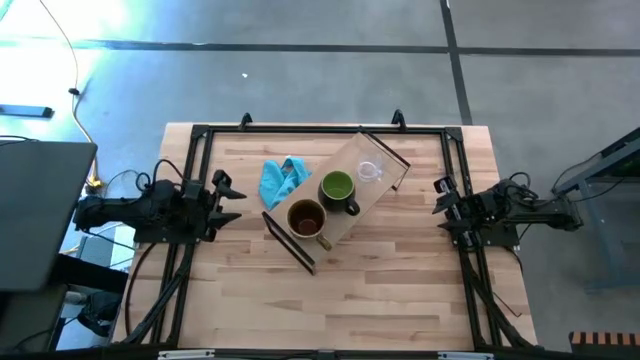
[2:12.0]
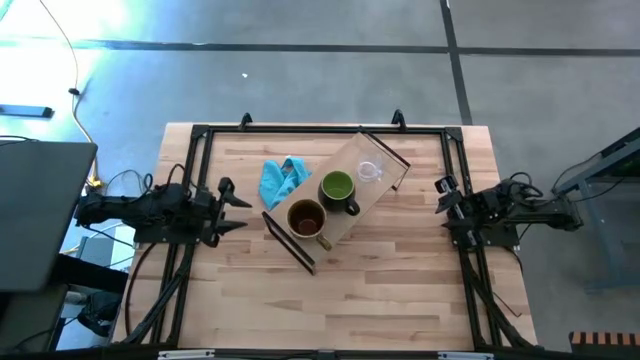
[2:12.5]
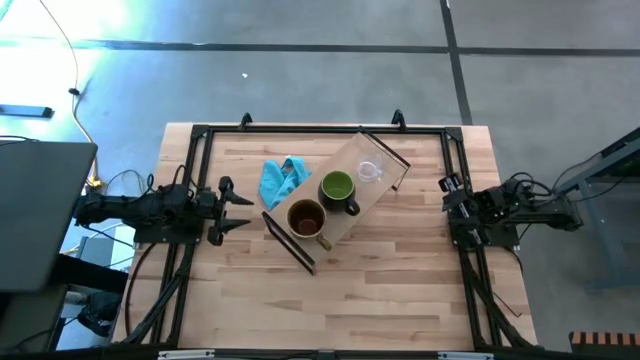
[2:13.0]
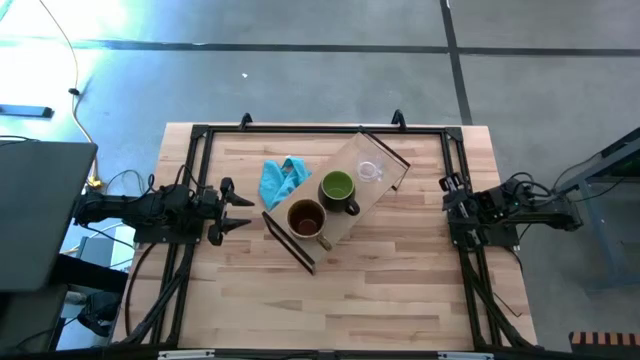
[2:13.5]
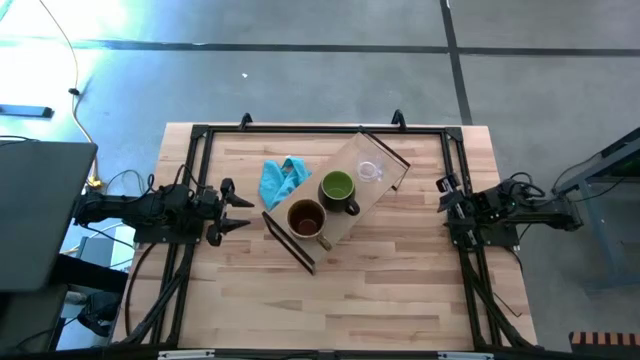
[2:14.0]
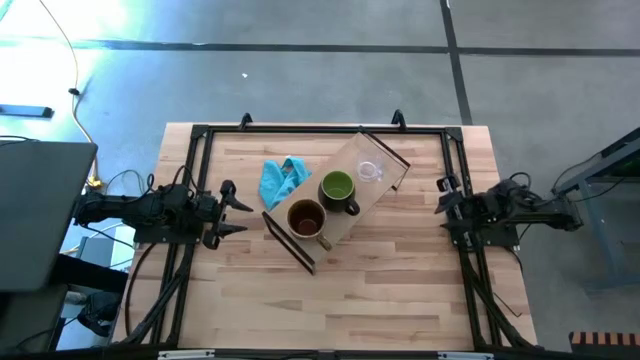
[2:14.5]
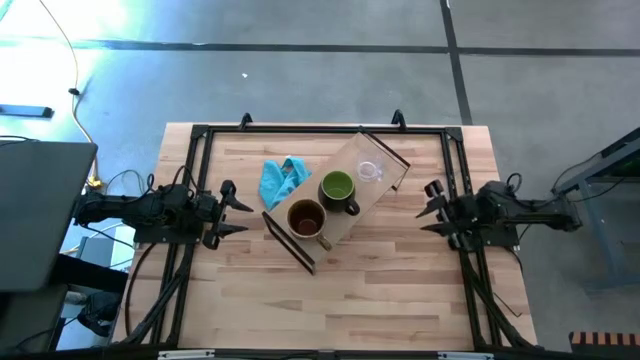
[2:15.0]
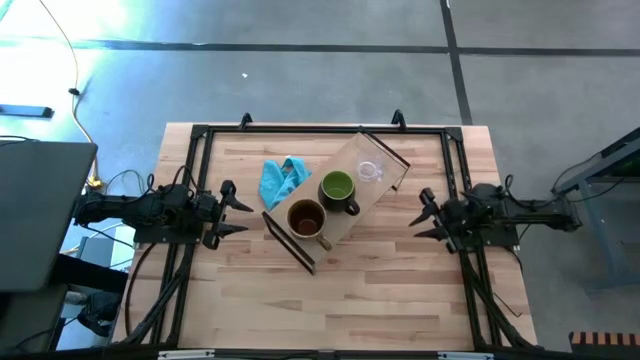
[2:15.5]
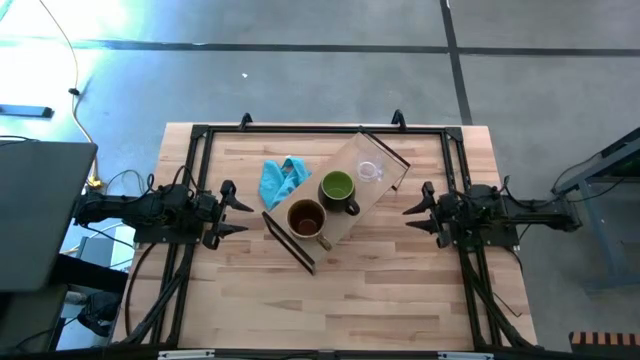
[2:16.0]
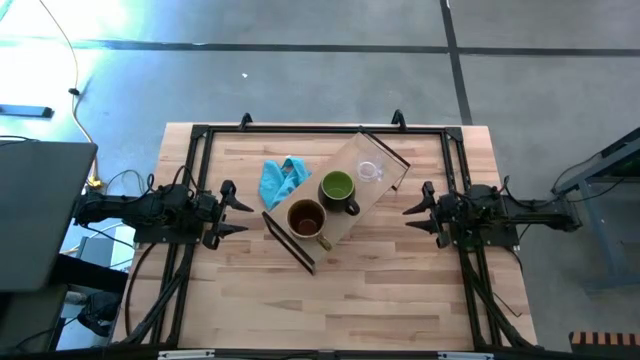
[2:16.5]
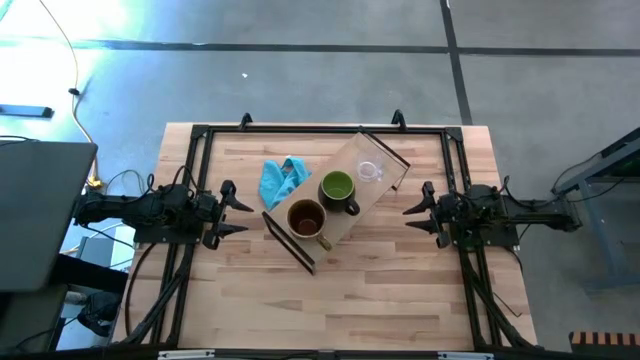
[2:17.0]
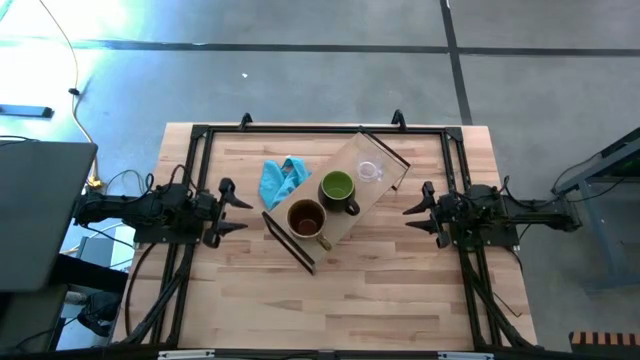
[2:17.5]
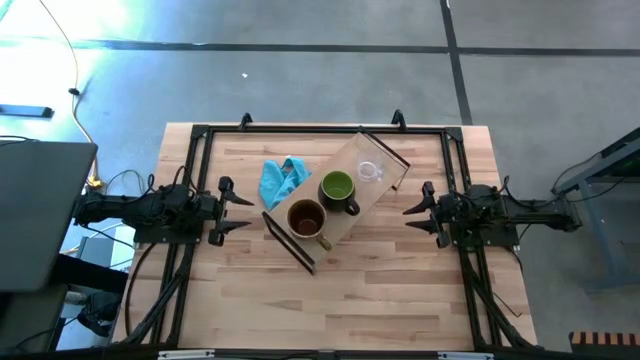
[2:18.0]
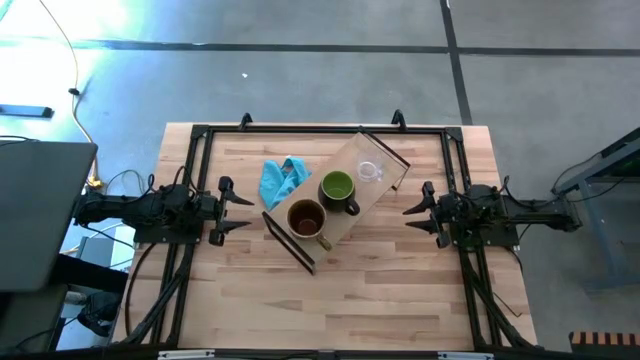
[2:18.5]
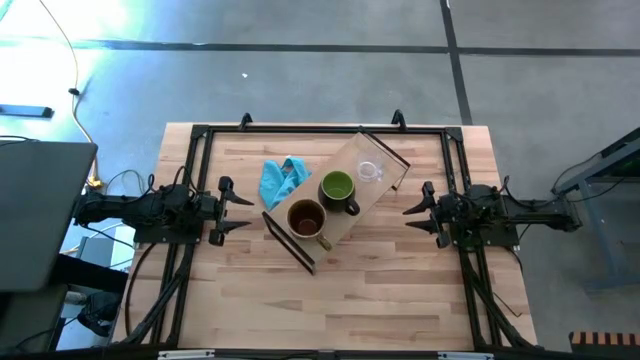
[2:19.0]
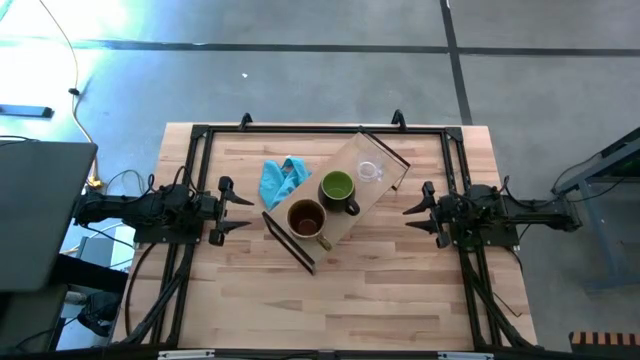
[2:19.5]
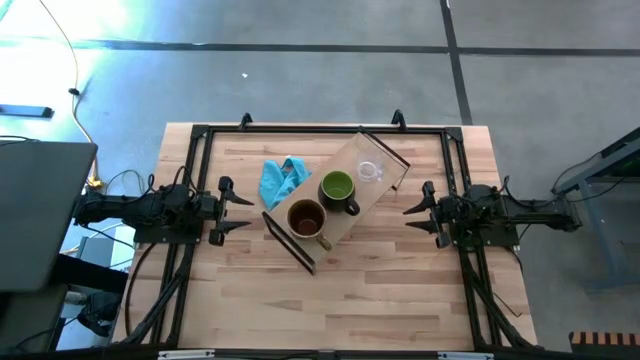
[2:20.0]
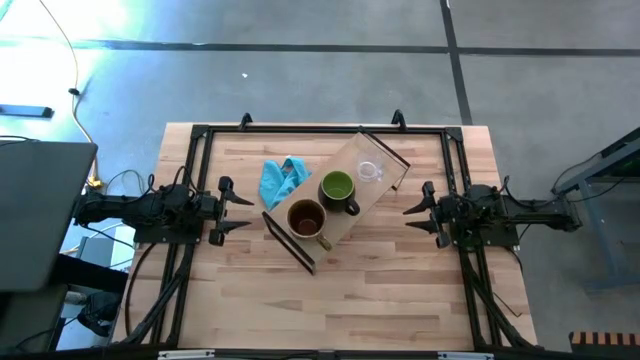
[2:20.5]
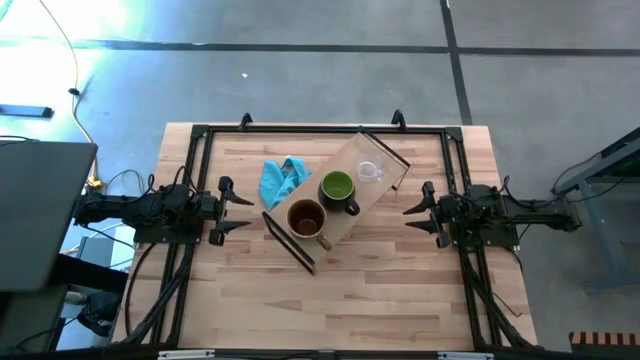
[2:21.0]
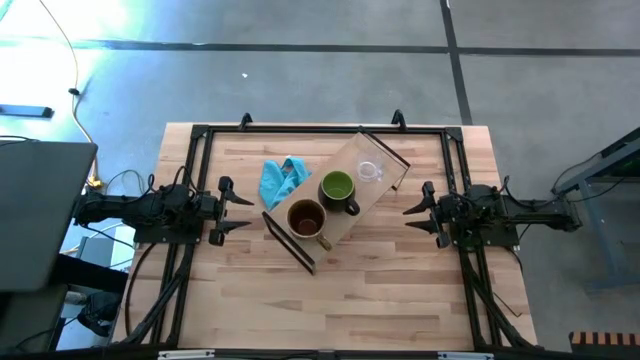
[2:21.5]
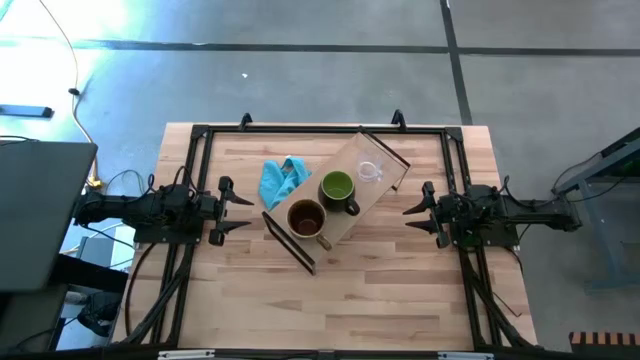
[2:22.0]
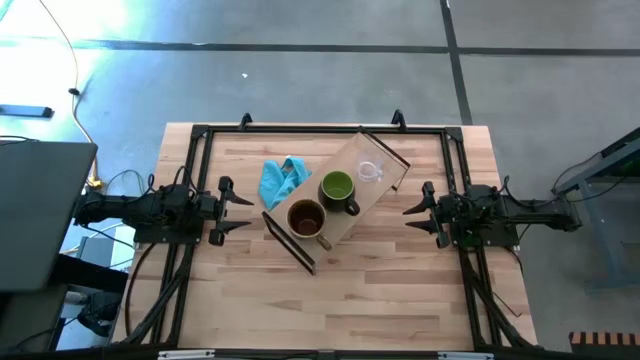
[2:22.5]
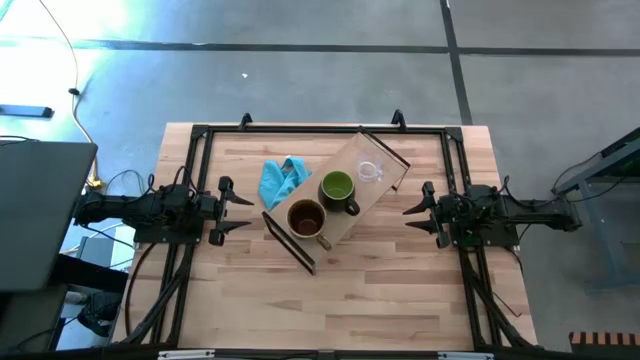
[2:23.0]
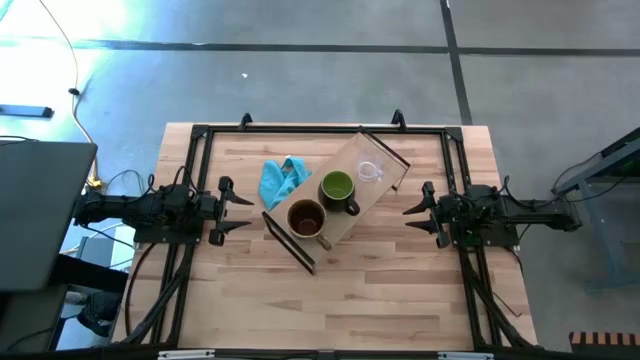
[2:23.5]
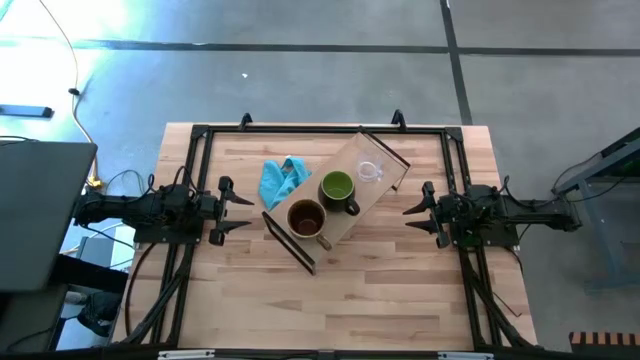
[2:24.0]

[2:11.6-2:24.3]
Task: Stack small to large cups/mugs on shelf
Return to Home Position
